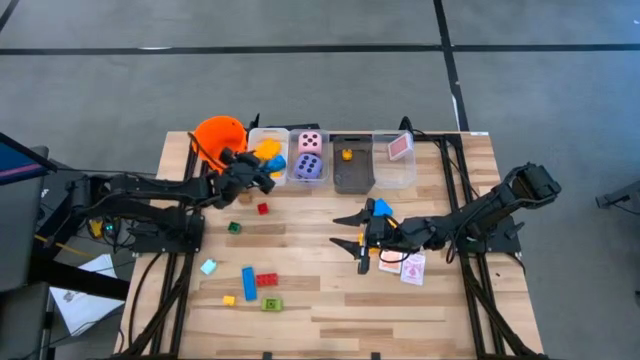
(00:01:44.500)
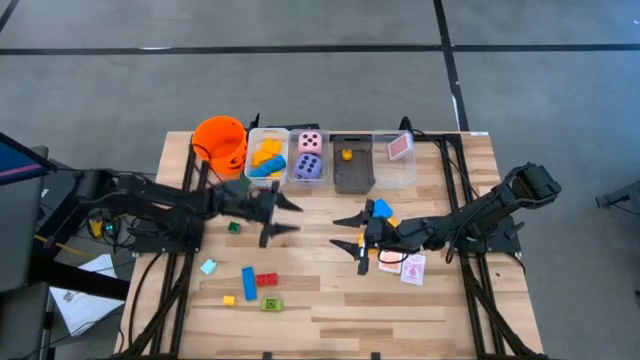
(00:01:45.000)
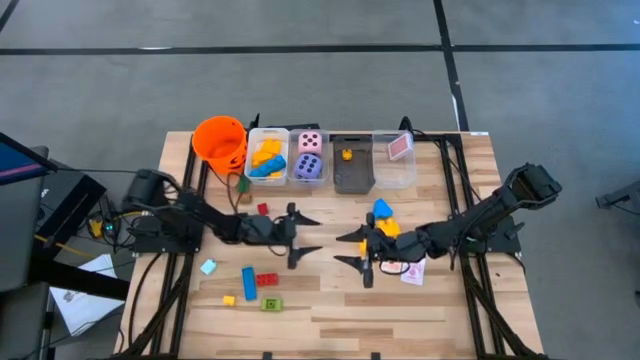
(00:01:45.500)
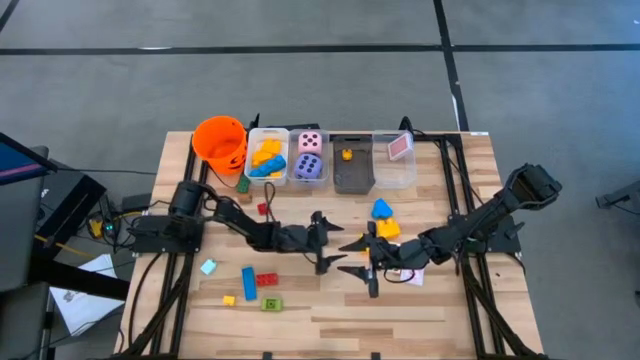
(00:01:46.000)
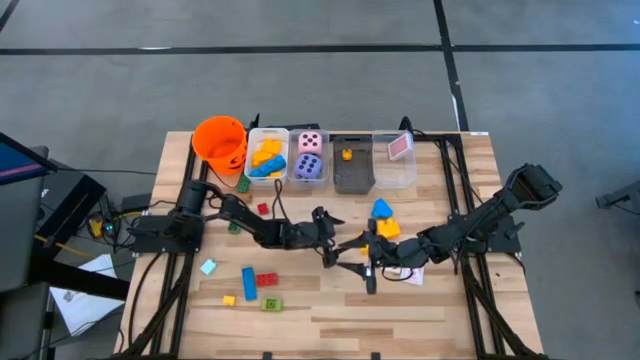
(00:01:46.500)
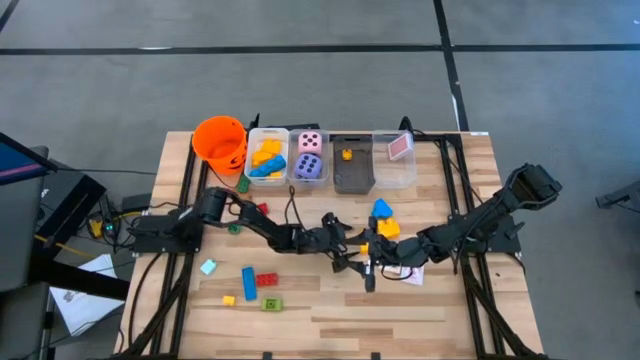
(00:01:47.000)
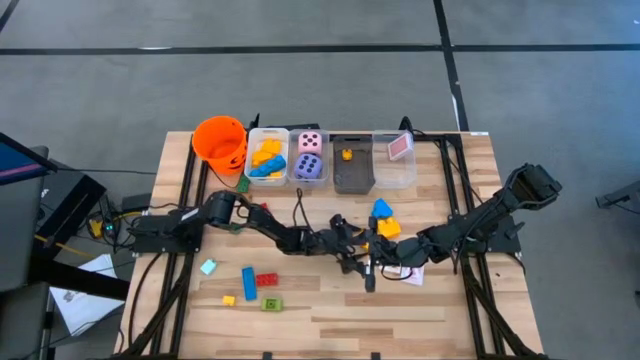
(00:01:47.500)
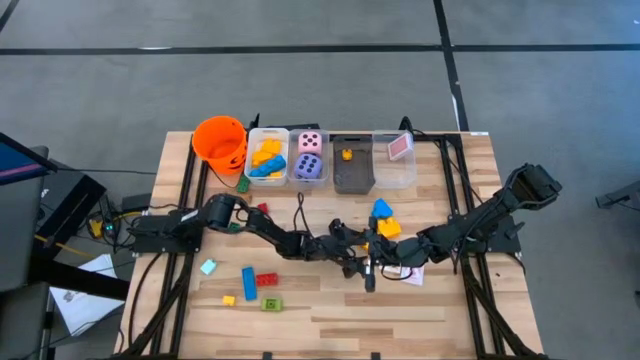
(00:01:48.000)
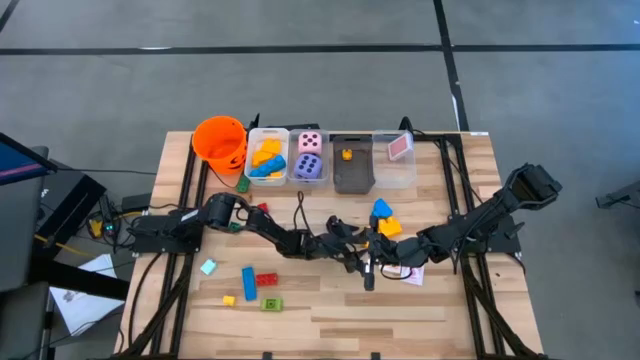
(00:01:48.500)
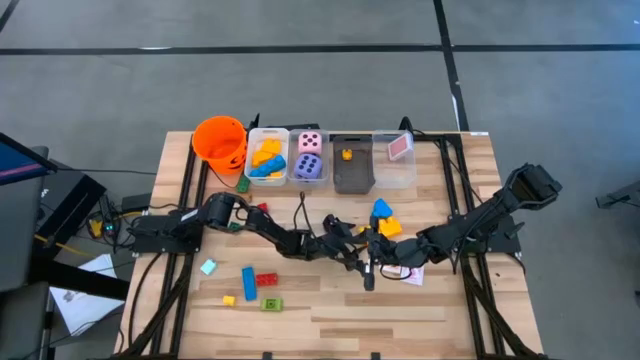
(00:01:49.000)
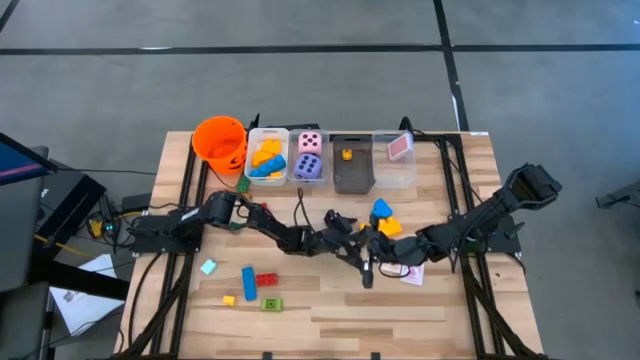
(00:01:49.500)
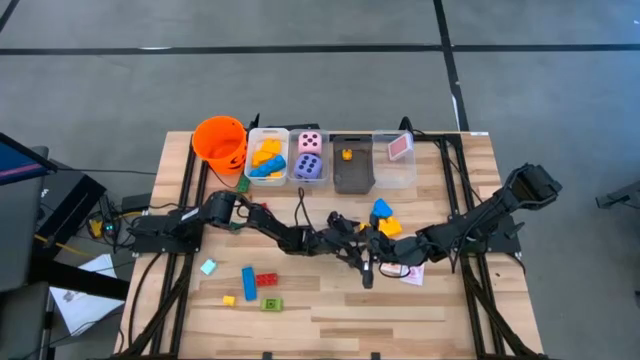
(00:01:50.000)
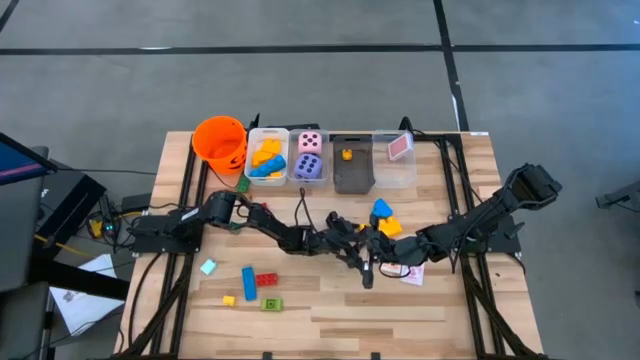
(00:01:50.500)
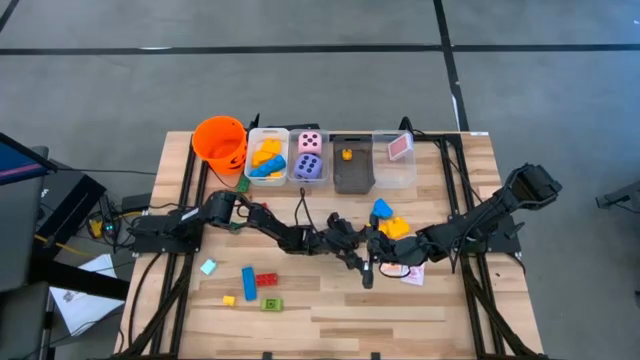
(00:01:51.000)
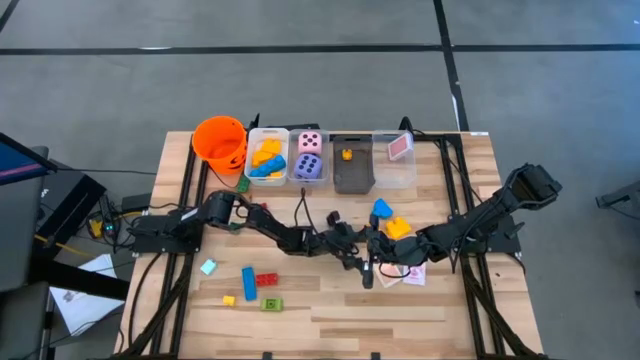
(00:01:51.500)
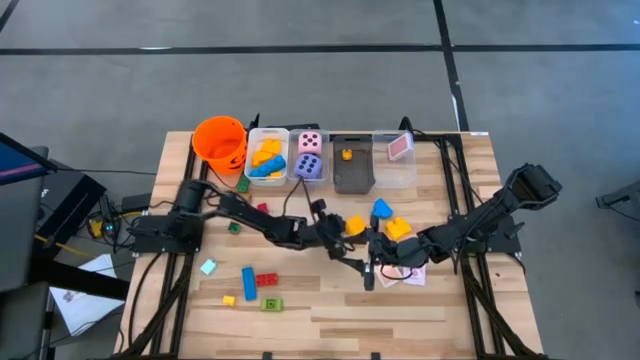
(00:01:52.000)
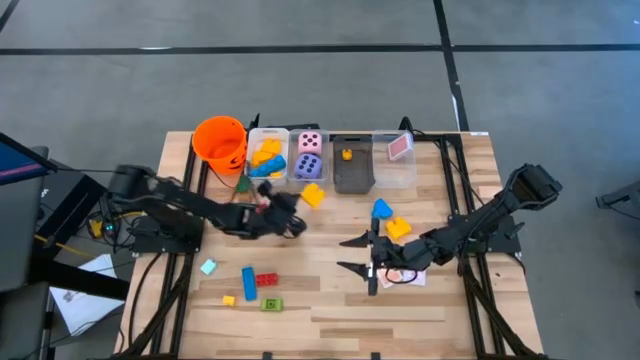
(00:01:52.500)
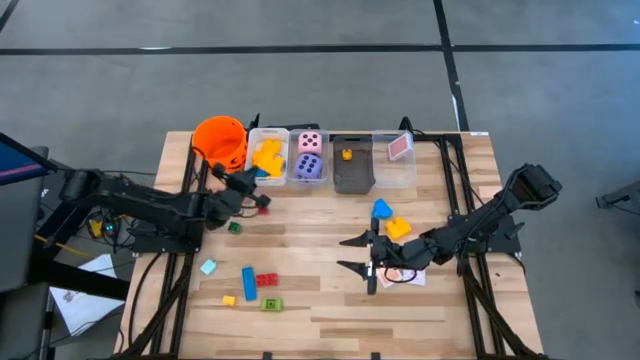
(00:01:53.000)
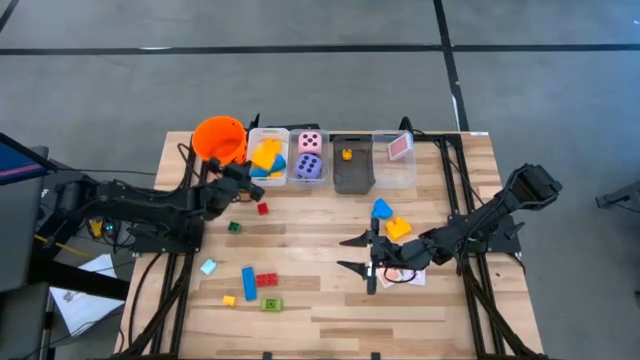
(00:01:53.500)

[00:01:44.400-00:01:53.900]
Task: Pick & Place Toys
Put the yellow stud game piece into the white bin

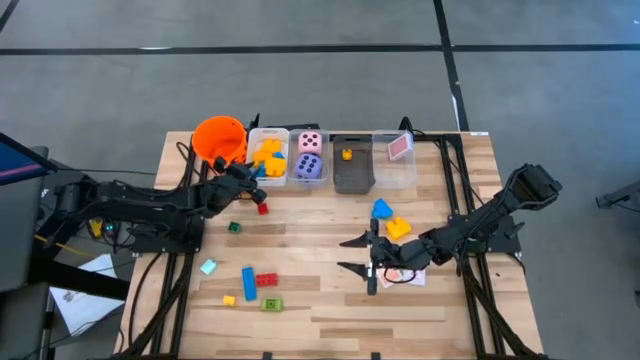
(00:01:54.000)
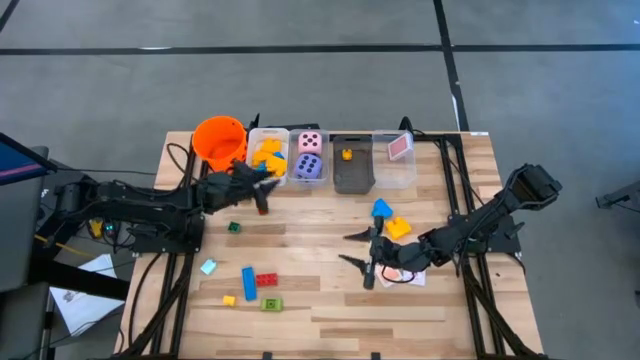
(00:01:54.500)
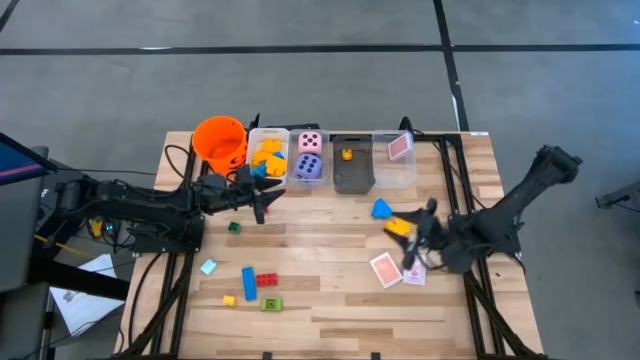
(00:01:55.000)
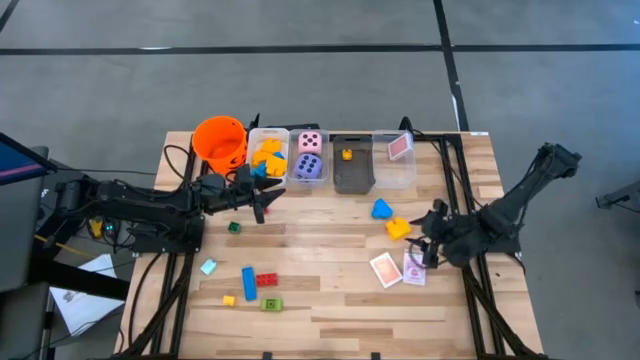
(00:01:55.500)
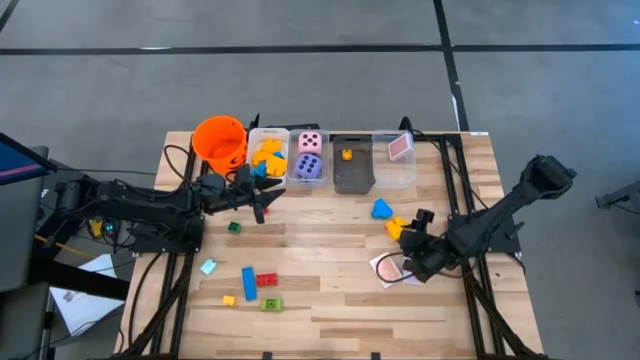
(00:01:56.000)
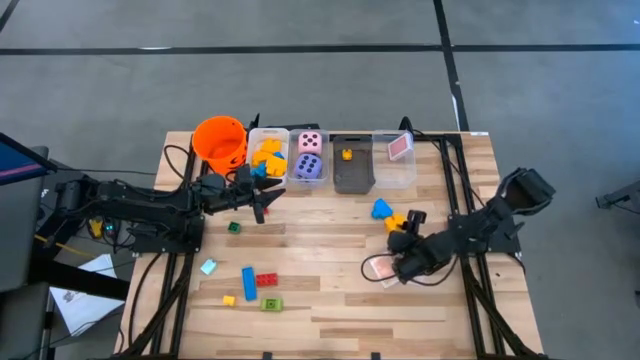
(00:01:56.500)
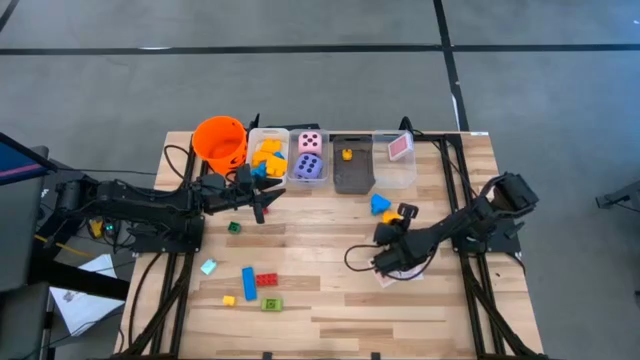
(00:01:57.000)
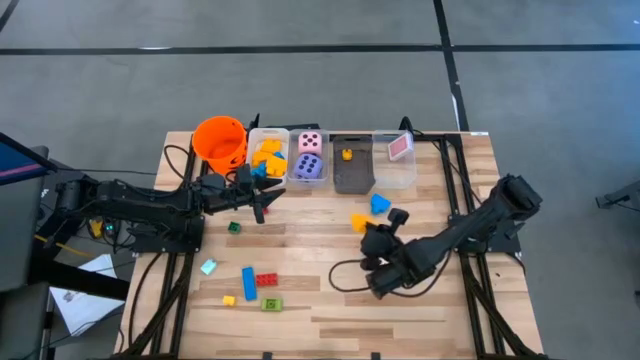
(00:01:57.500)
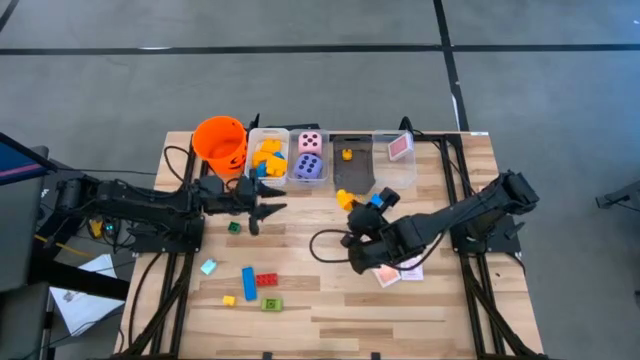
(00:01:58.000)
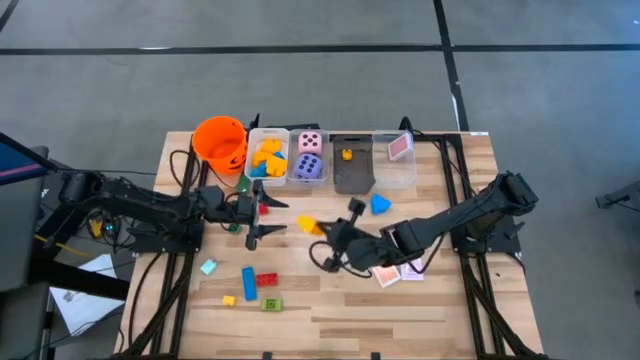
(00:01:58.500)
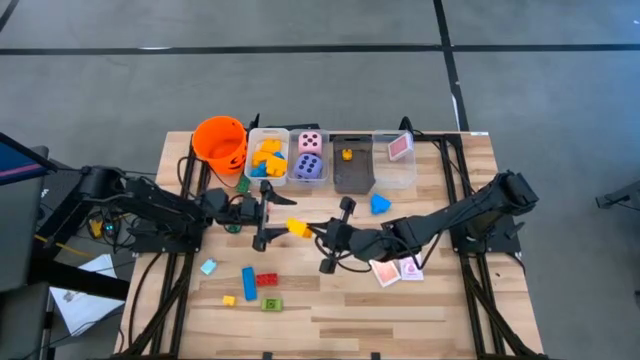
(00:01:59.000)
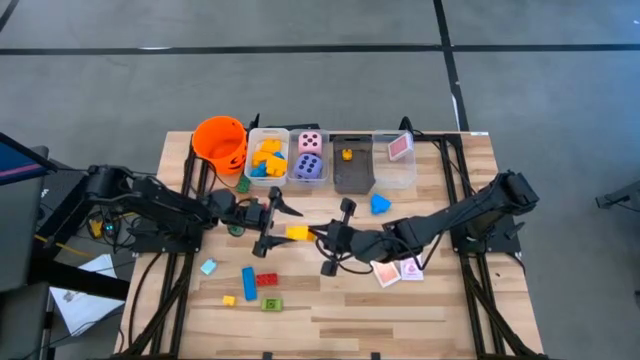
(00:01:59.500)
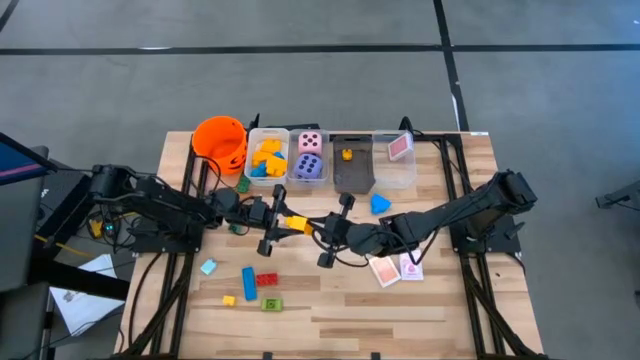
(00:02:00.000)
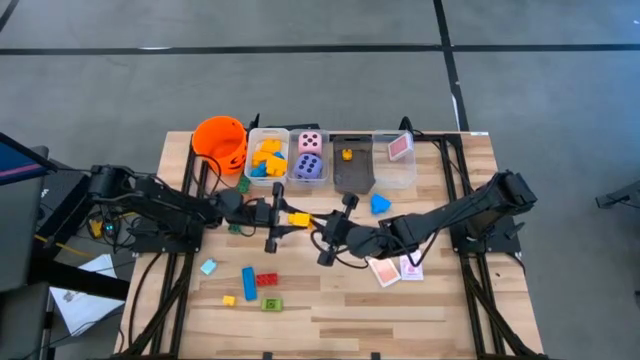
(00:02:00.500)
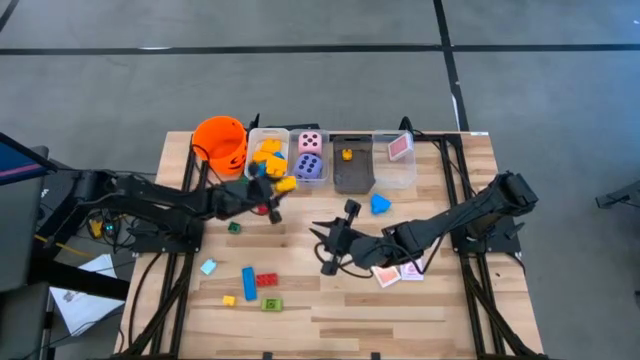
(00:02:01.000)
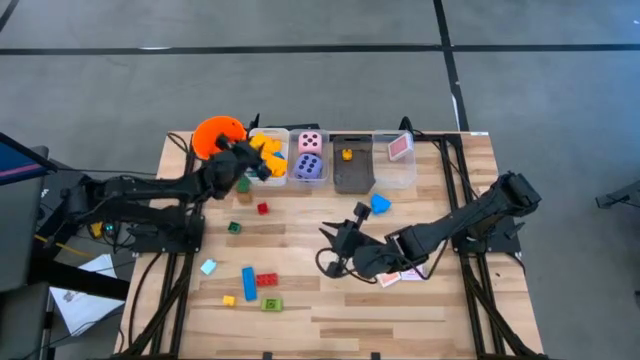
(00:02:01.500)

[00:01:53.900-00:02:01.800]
Put the yellow stud game piece into the white bin

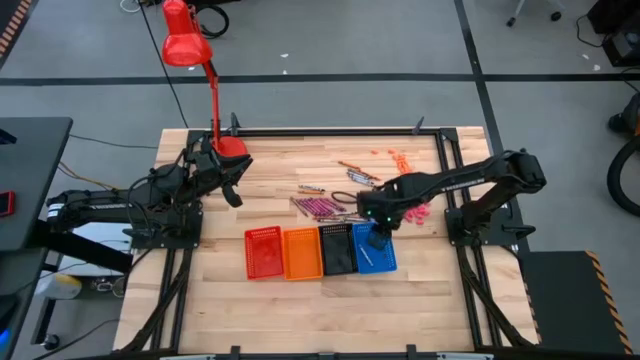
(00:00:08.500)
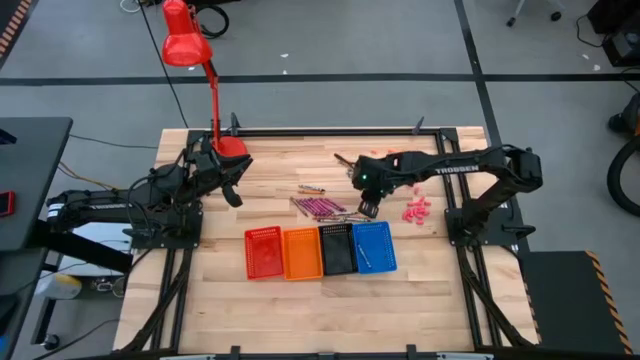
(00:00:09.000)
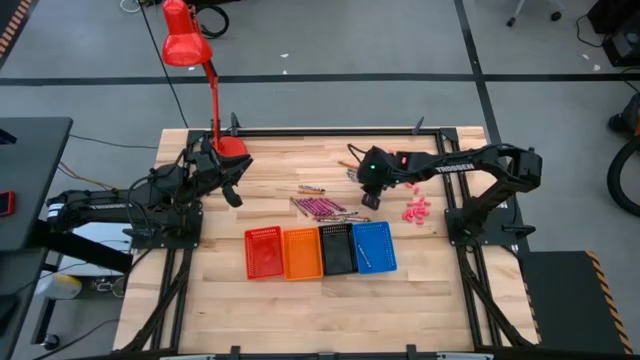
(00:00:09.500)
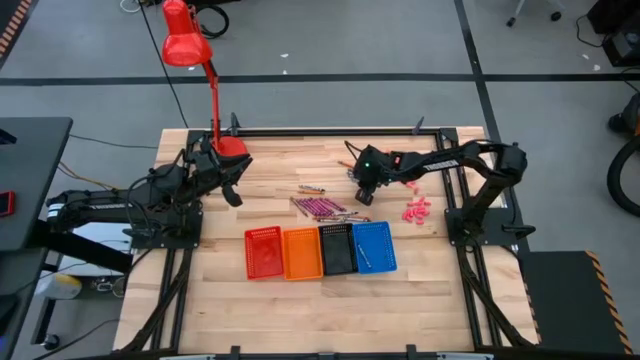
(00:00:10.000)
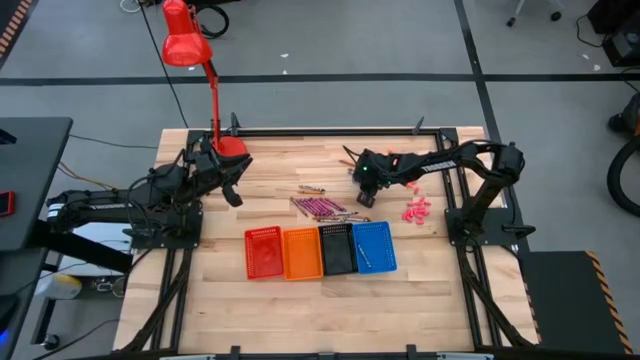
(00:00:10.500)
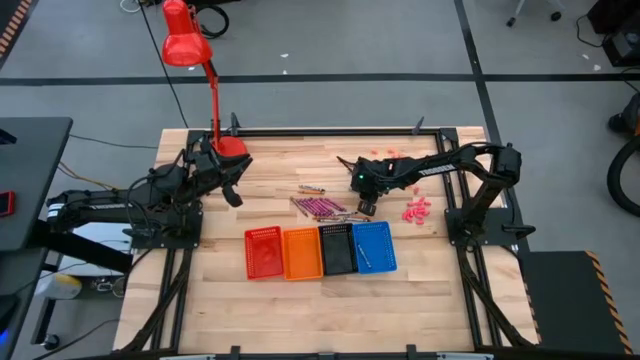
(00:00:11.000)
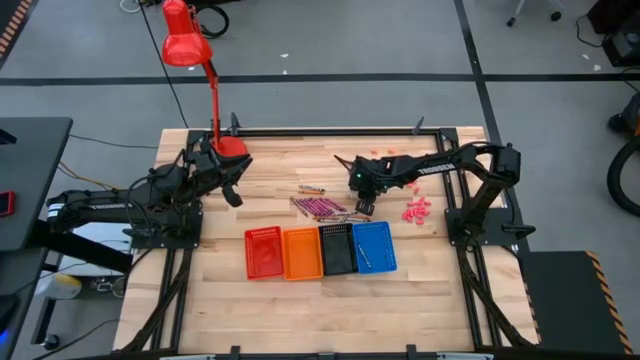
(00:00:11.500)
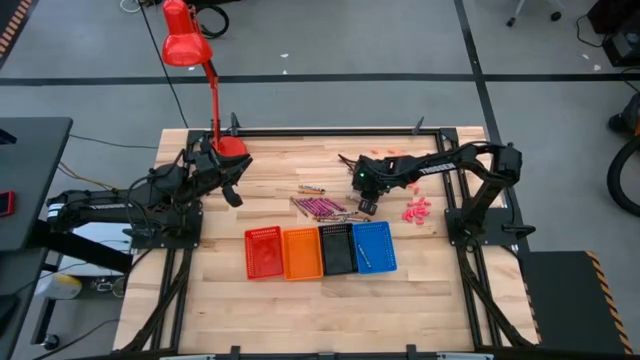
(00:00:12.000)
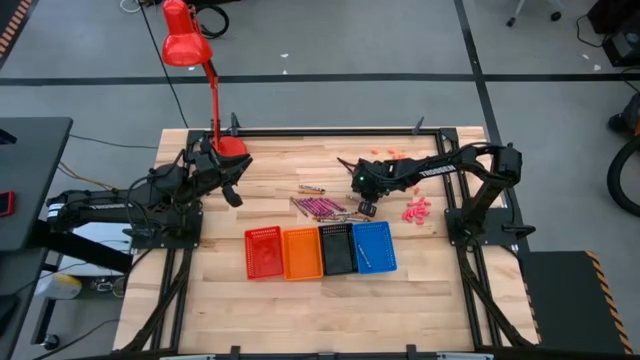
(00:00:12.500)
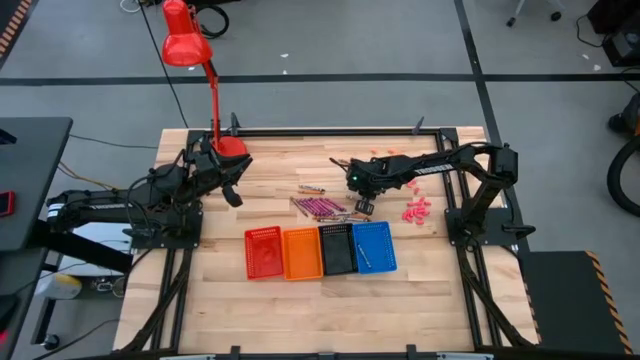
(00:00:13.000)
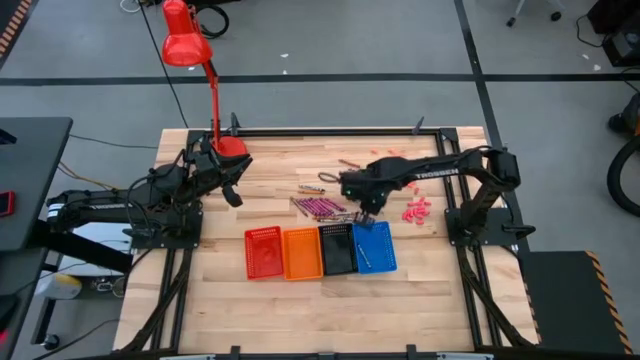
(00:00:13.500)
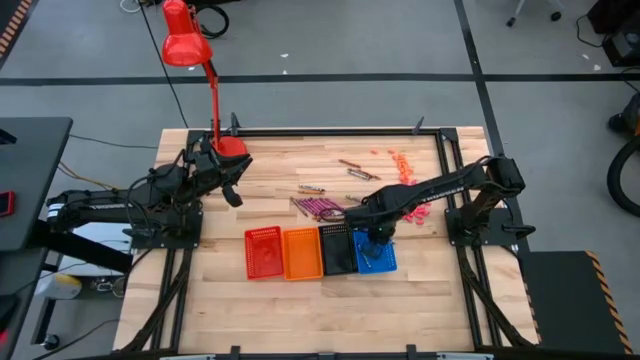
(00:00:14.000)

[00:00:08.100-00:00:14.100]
Task: Sort crayons
Put the black crayon into the blue bin
